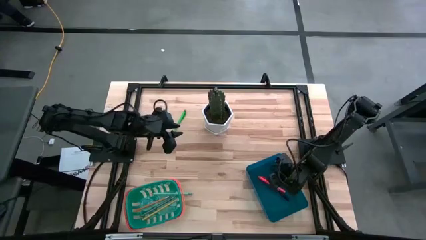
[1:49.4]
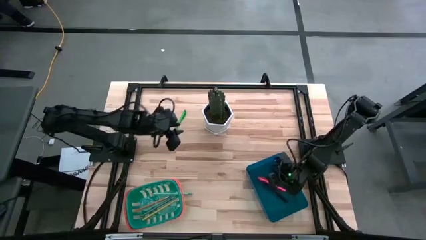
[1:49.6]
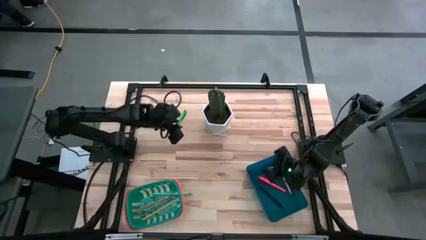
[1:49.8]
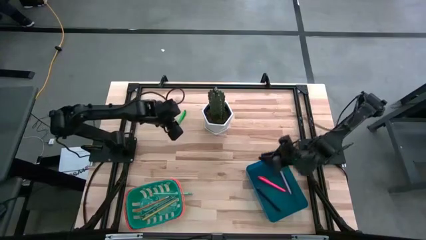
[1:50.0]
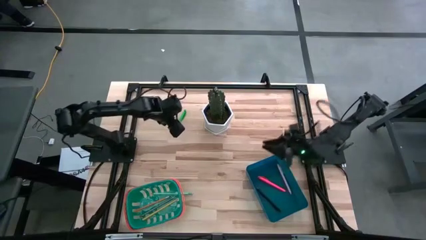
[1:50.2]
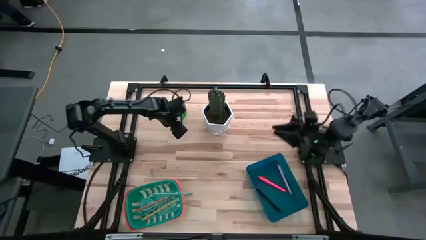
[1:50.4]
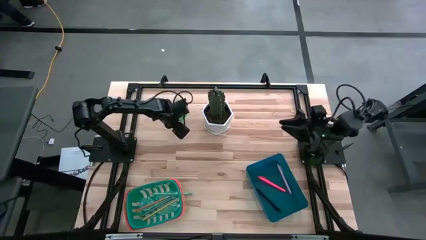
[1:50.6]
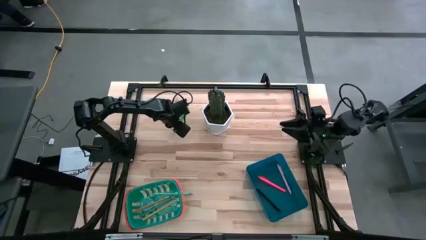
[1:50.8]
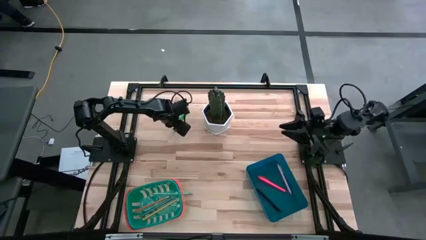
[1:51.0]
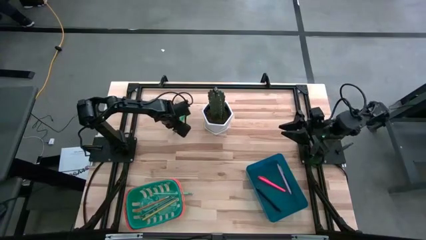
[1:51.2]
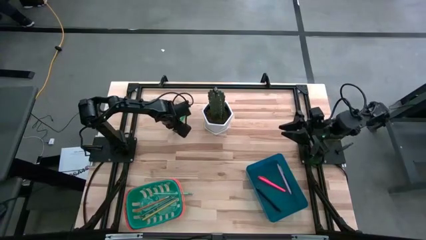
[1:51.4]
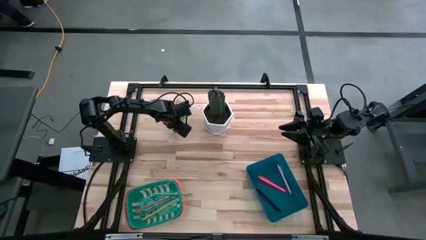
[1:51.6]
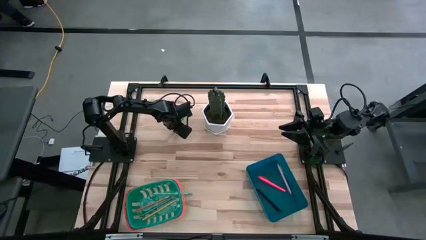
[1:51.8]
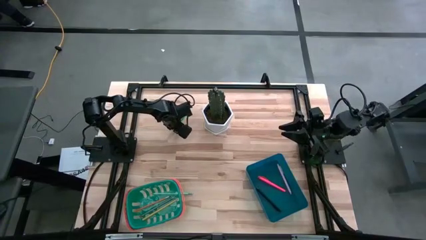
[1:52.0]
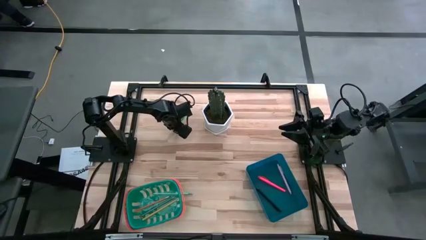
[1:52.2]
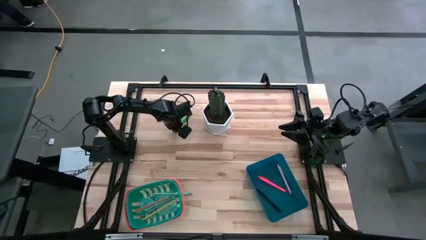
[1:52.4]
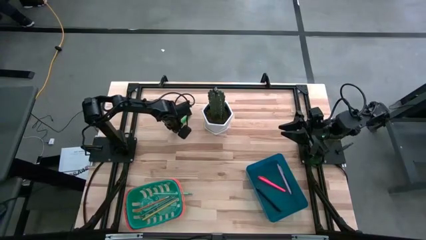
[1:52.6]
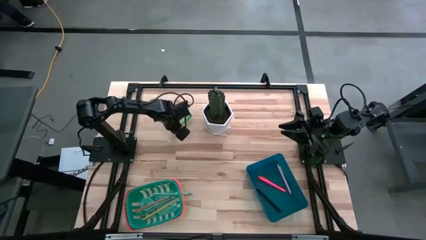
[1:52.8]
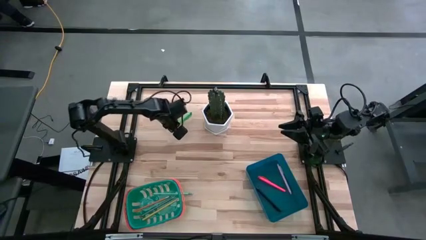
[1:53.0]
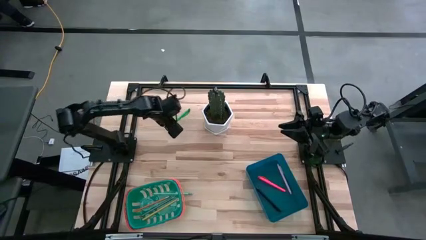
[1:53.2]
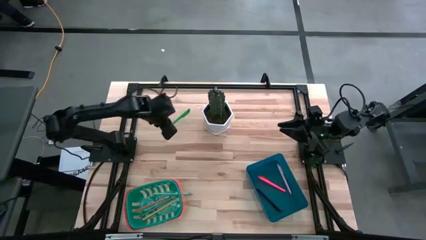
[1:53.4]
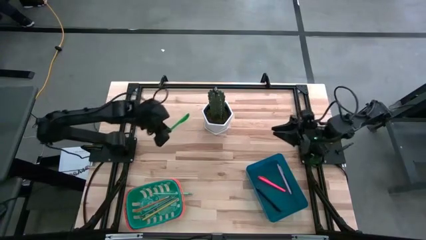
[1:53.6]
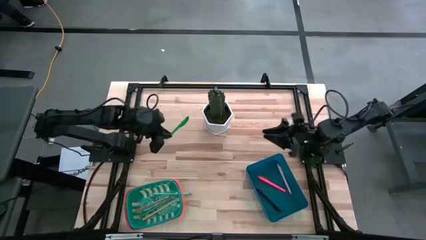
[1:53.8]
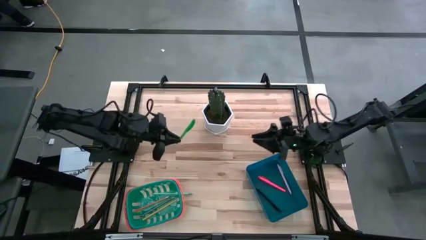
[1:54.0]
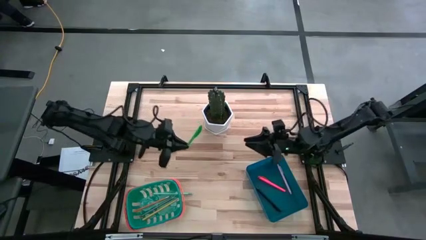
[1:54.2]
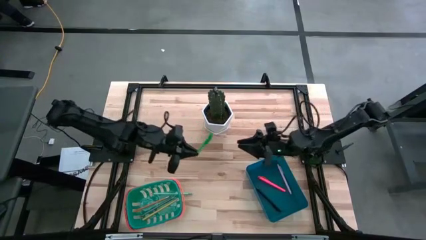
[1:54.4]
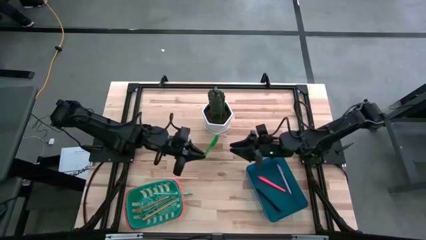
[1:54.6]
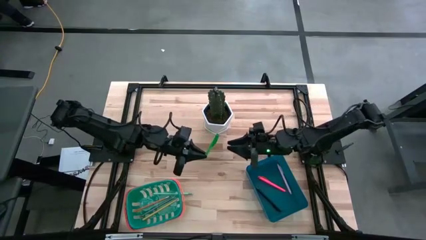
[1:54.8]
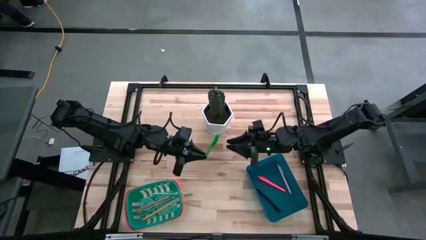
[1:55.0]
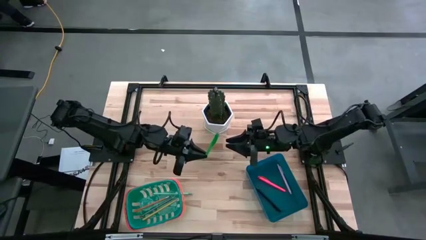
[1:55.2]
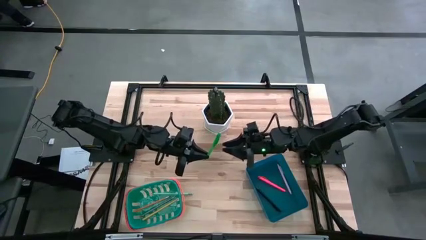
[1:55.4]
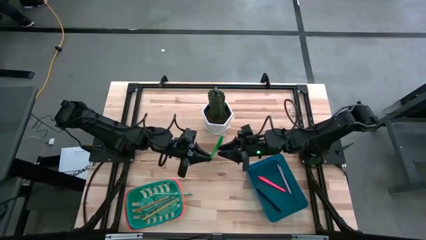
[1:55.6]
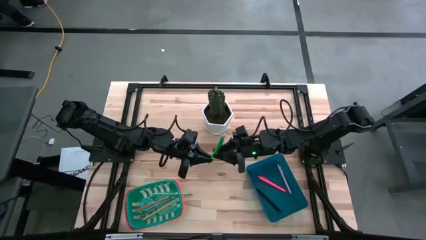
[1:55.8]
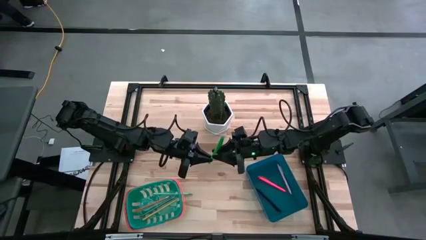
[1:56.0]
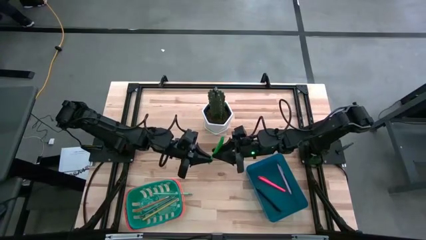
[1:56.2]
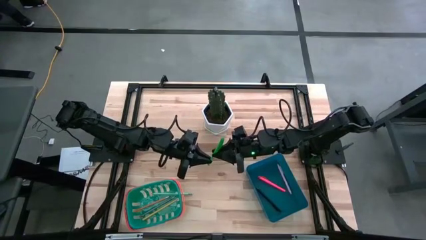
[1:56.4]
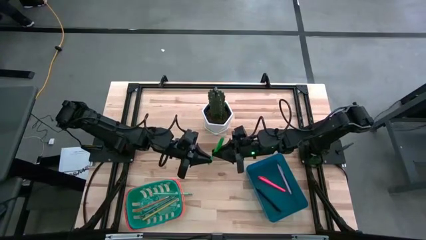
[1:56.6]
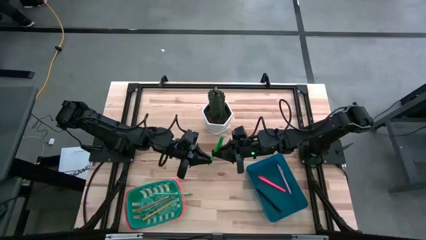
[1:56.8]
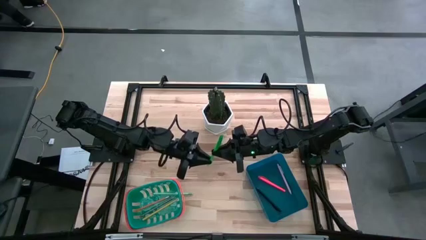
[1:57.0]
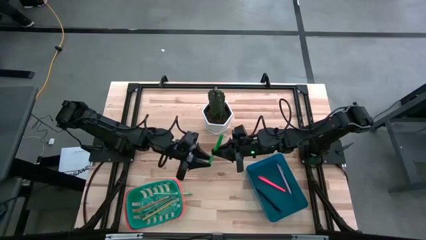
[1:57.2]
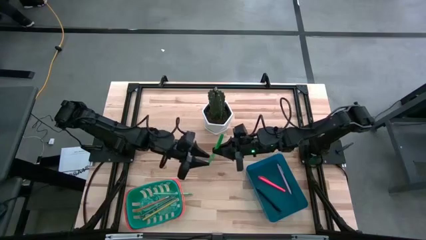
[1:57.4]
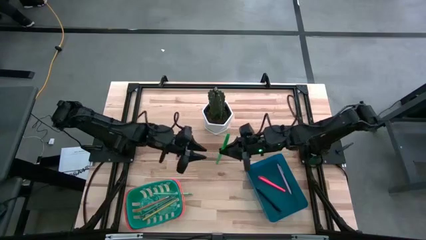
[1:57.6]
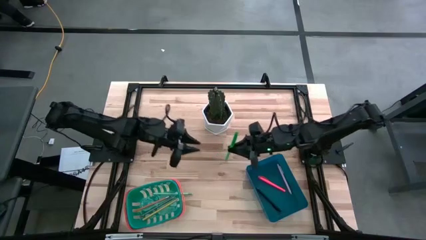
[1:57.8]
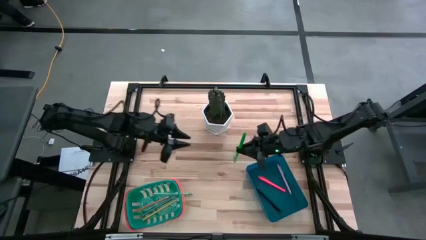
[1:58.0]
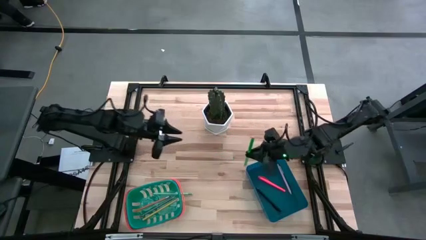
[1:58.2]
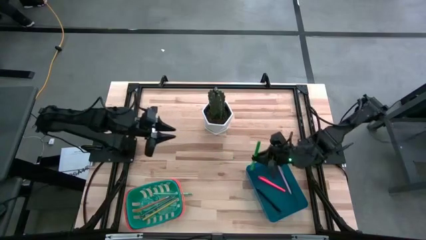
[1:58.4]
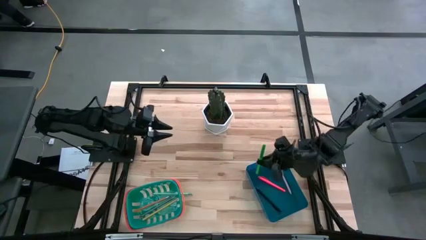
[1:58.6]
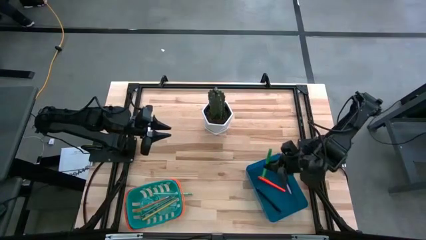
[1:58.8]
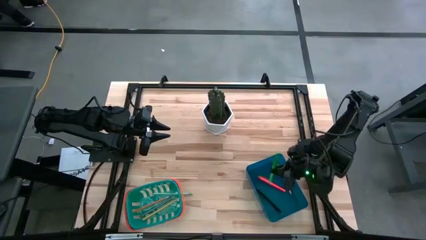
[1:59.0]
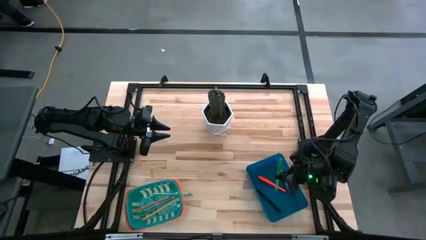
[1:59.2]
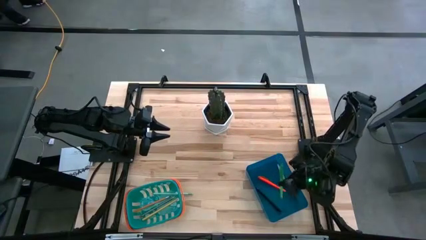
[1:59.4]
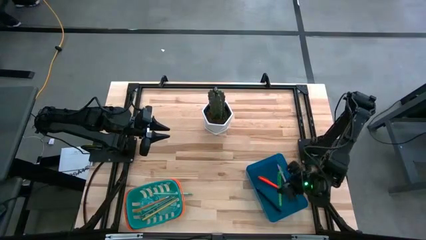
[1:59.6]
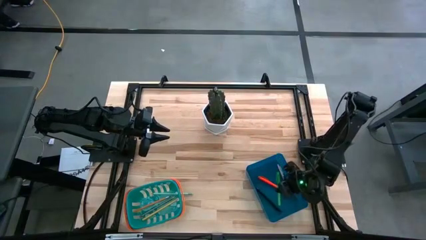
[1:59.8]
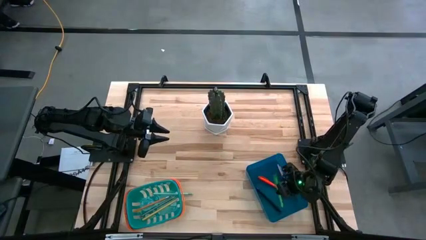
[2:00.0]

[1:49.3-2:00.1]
Task: Sort pens & pencils
Put the green pen into the blue bin
